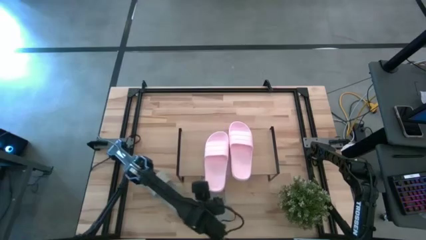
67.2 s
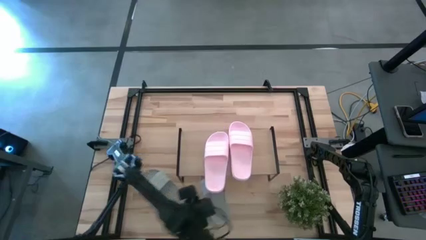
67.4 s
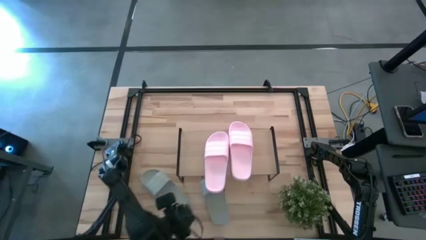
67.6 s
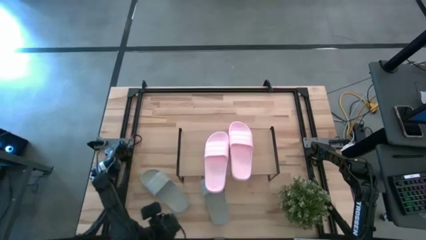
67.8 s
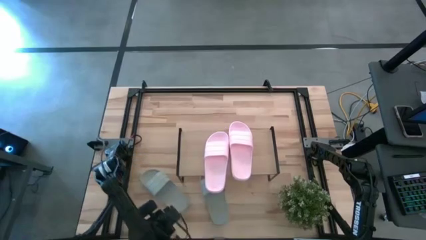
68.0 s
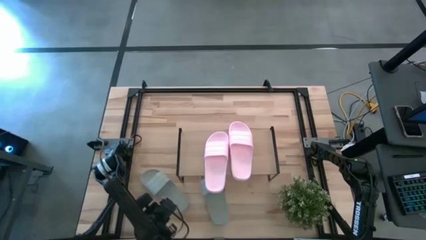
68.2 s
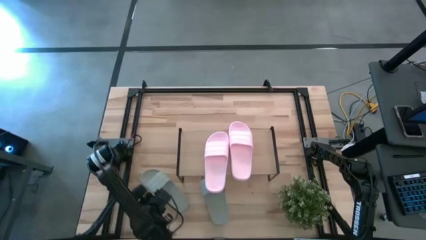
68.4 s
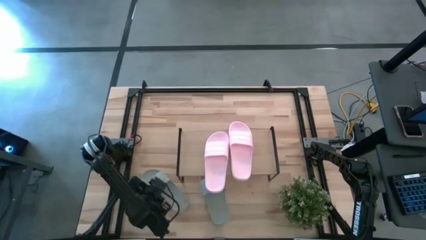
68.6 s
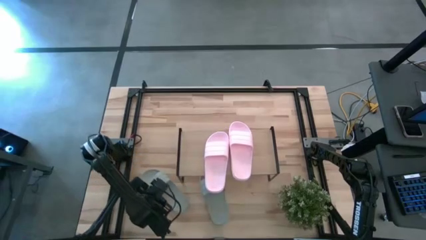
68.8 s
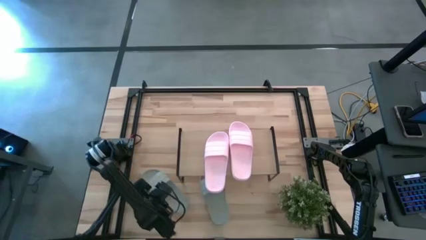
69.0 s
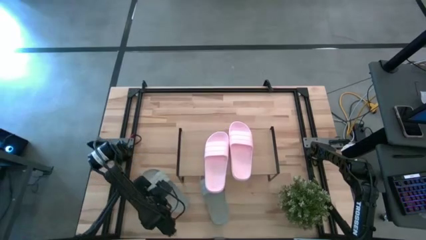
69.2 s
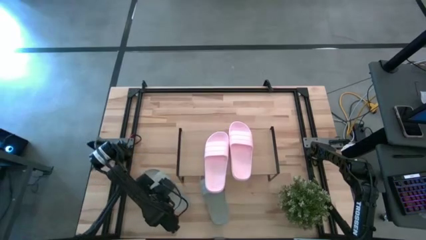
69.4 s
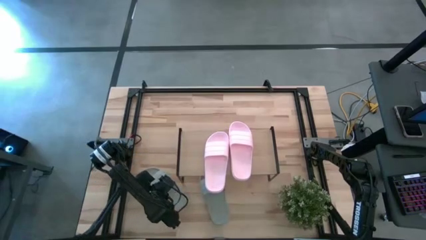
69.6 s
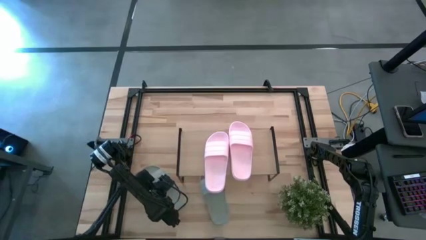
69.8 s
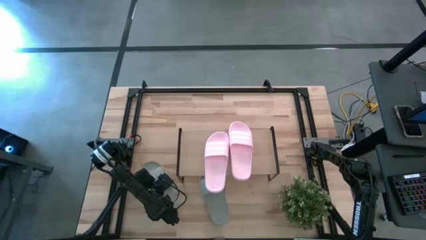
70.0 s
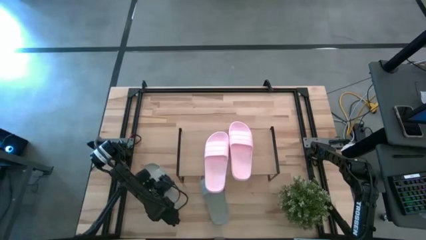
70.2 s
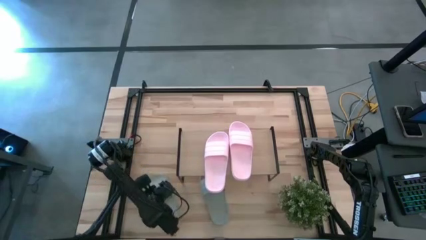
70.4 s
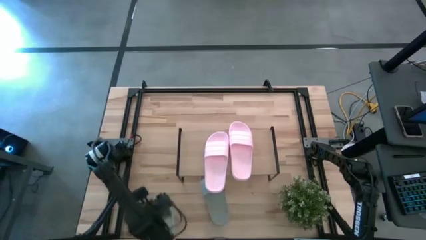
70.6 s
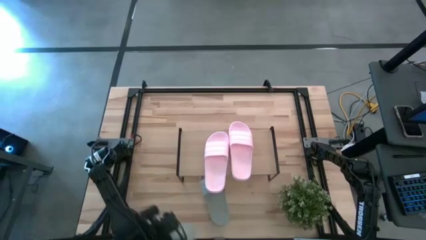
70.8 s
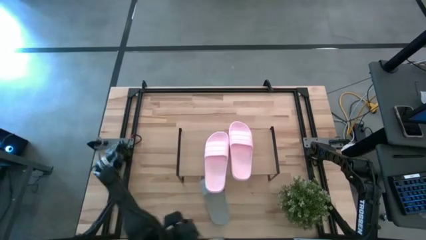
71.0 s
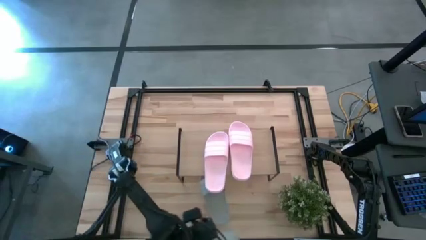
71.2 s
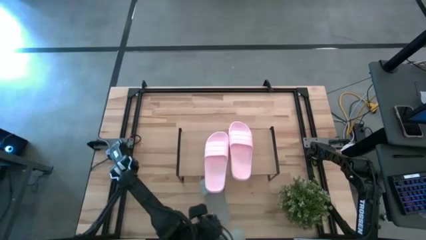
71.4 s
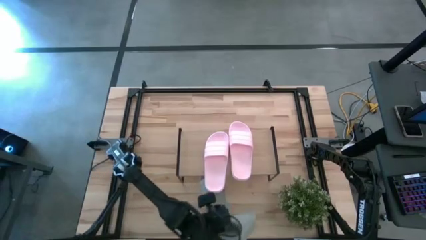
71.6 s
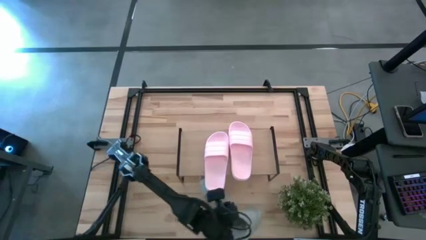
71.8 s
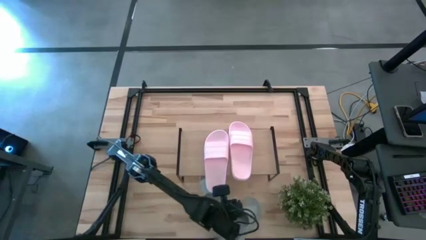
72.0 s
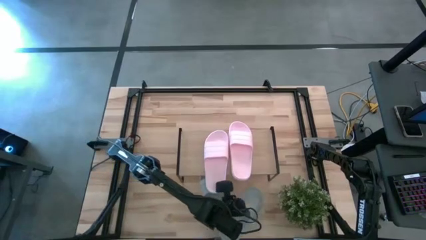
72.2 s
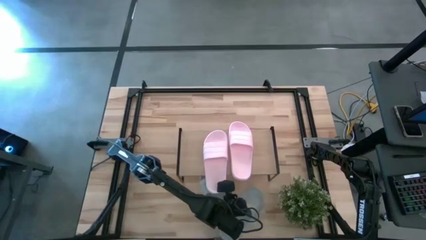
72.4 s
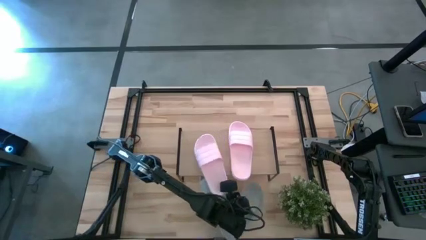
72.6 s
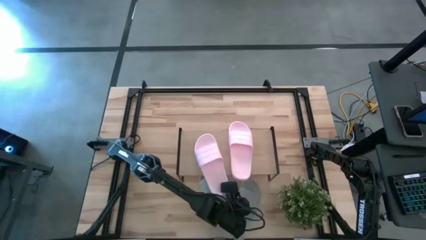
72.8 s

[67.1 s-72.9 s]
Task: Pick and place slides into the shelf
Put the gray slide under the shelf

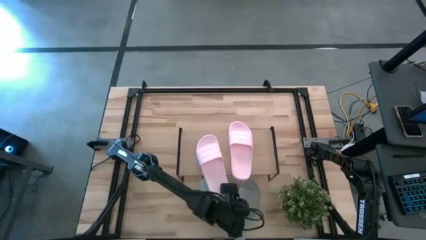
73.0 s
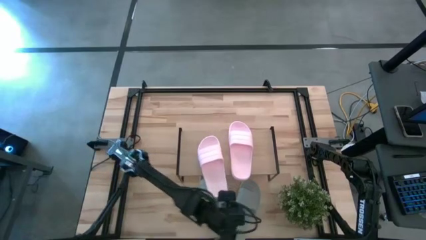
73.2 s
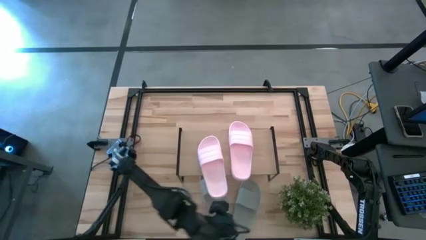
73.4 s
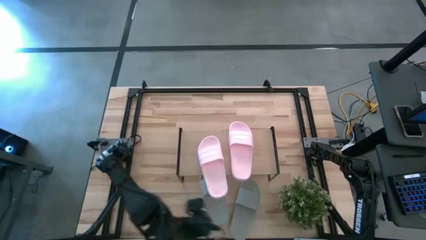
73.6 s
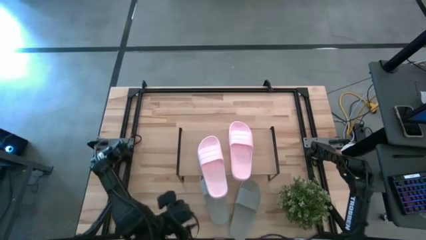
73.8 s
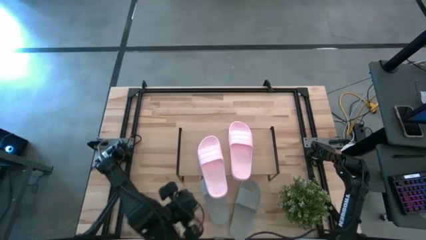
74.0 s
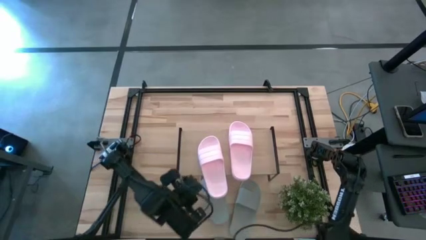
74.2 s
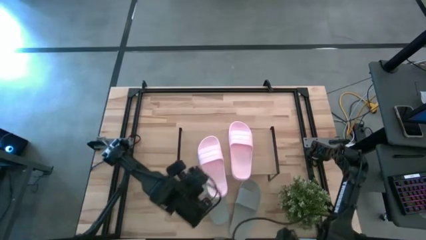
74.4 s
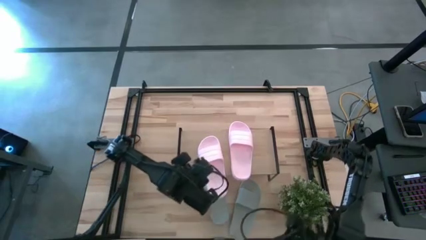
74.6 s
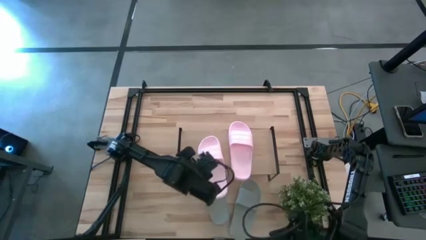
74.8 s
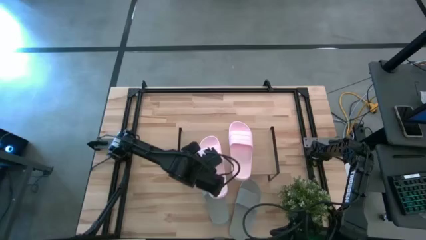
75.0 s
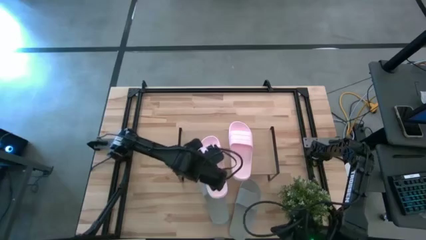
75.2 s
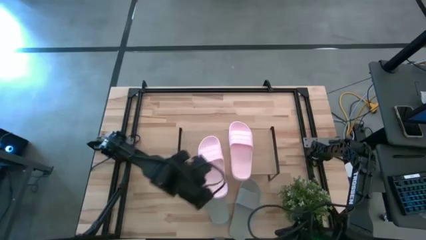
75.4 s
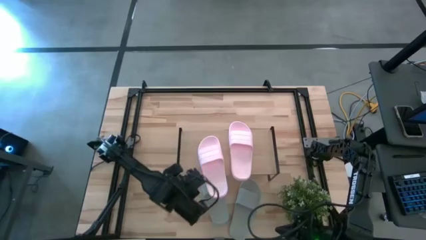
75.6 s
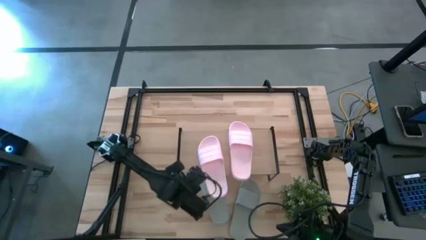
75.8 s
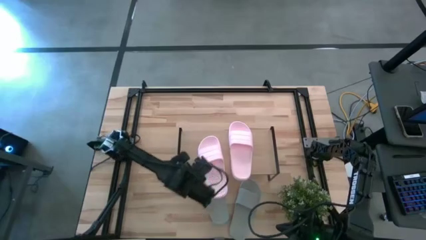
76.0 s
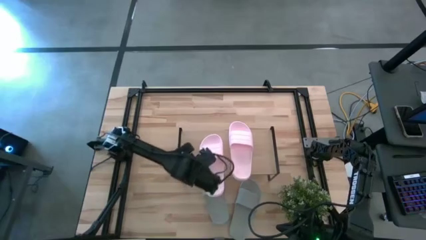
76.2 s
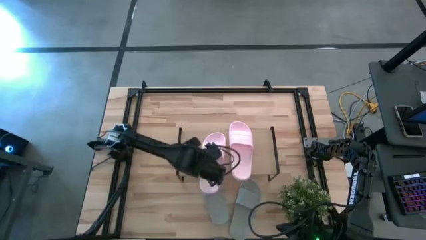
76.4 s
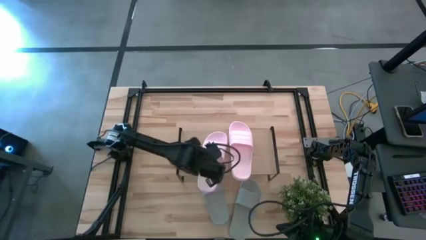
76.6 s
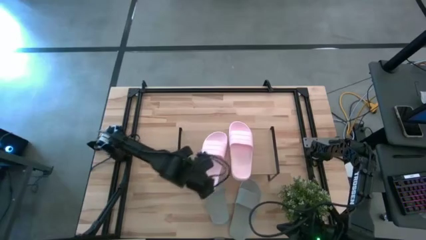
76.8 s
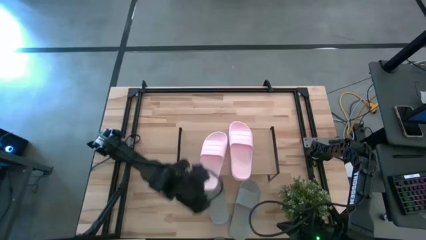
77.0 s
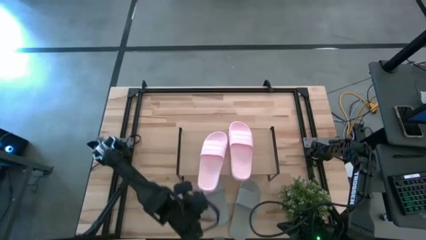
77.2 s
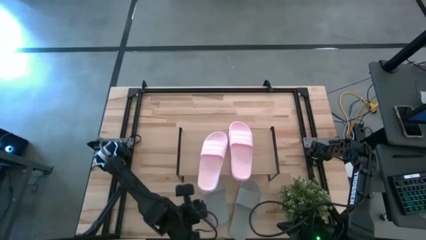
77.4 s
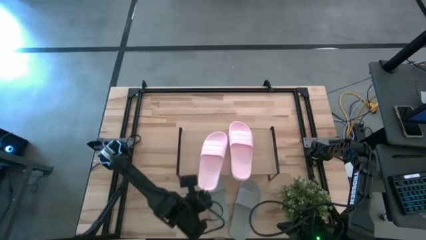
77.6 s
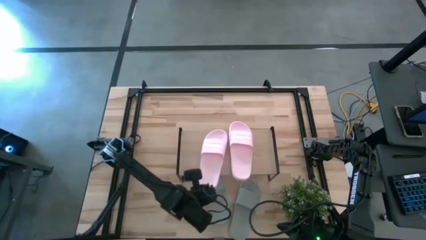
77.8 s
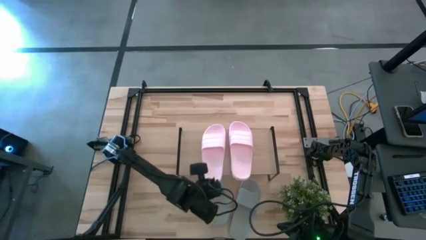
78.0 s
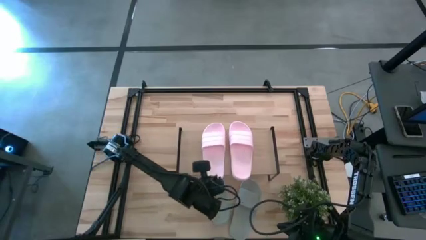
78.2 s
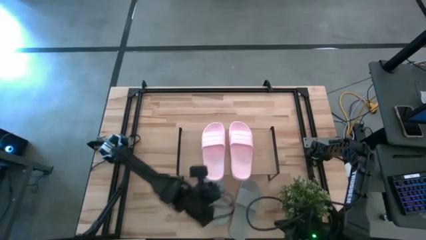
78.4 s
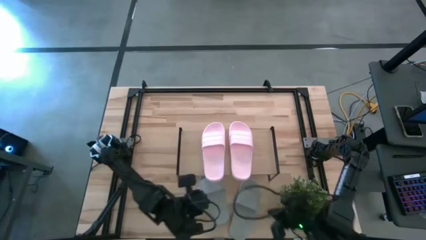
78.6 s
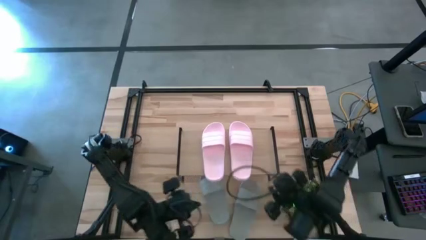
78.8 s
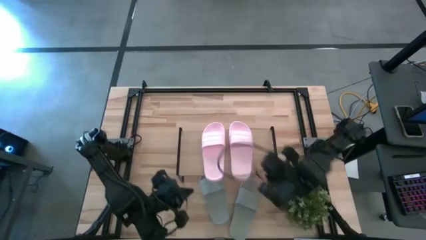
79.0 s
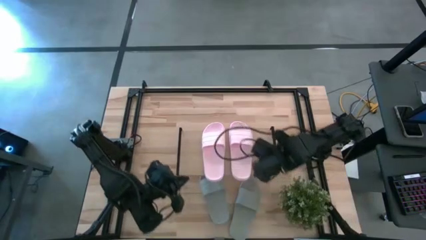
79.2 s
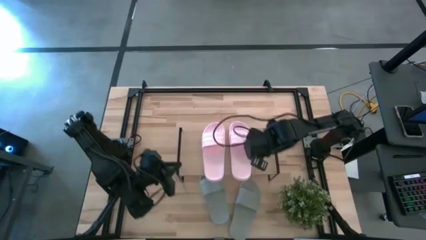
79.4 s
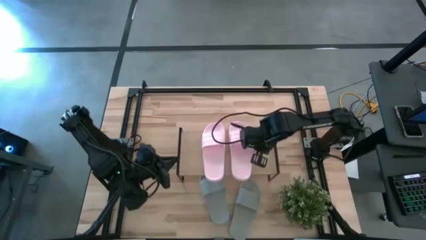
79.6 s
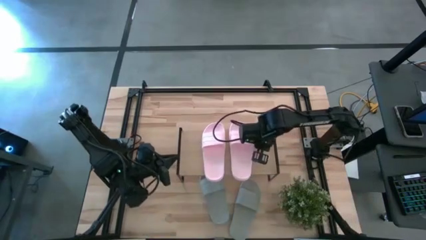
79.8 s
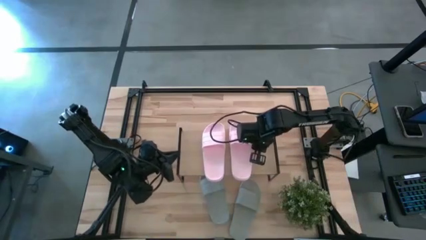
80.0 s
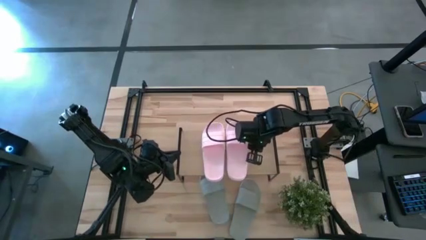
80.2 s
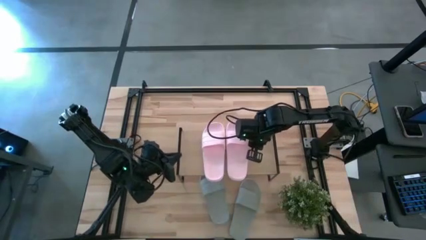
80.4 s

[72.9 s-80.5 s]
Adjust the pink slides on the shelf
